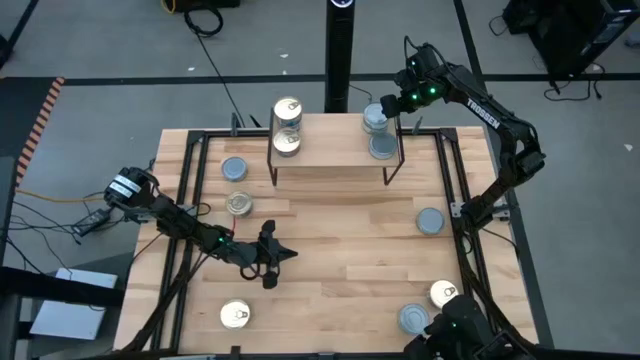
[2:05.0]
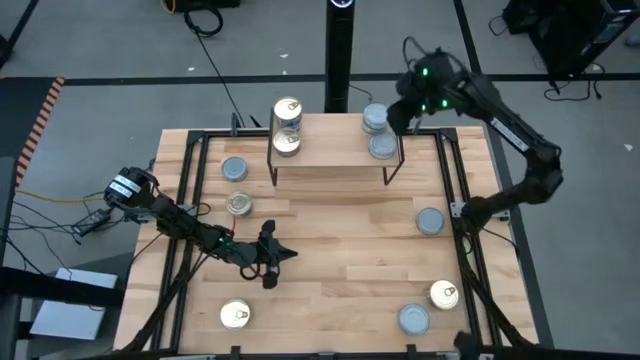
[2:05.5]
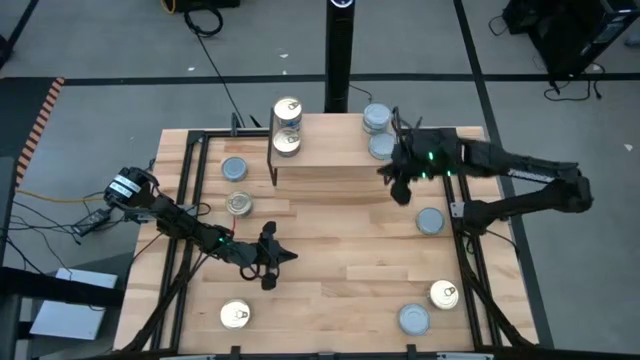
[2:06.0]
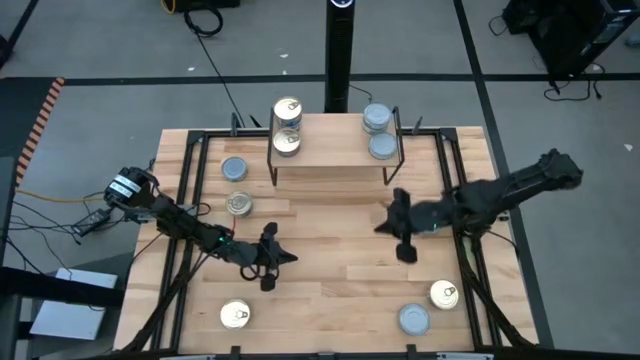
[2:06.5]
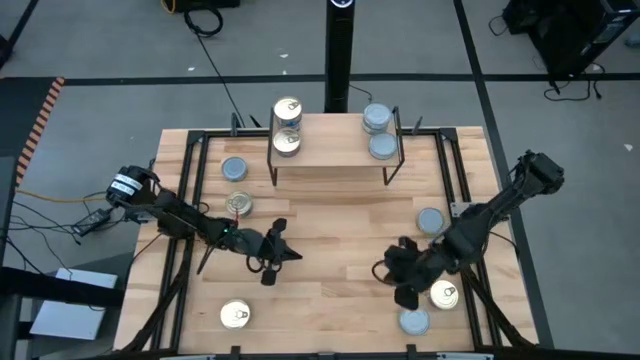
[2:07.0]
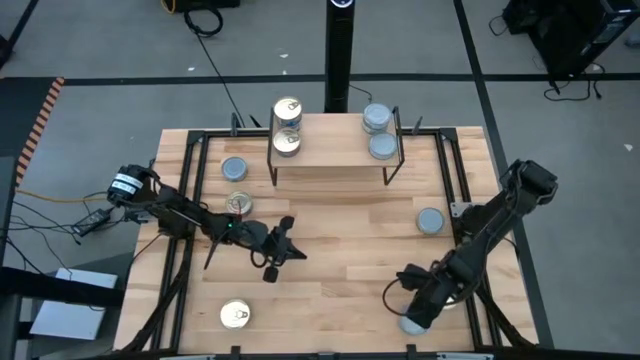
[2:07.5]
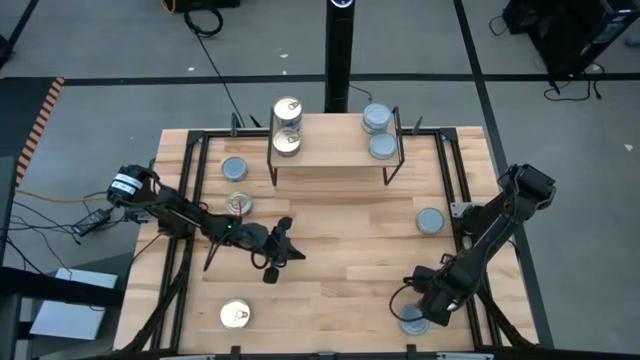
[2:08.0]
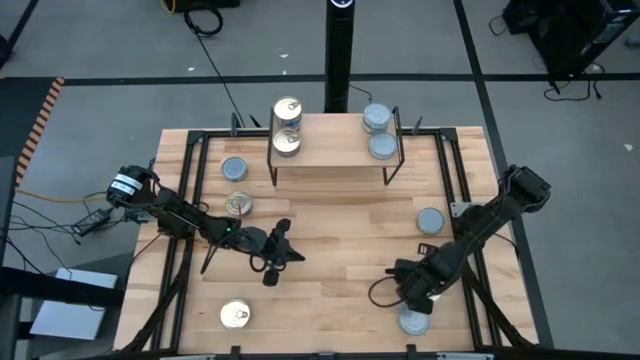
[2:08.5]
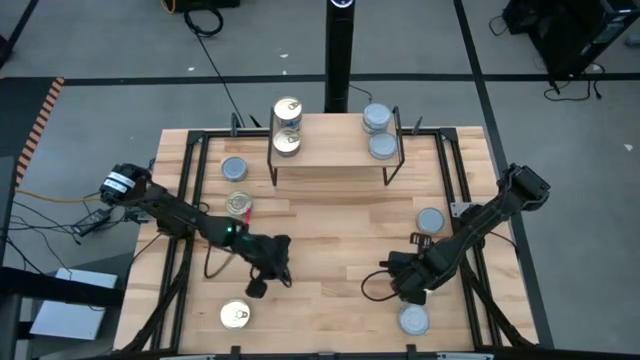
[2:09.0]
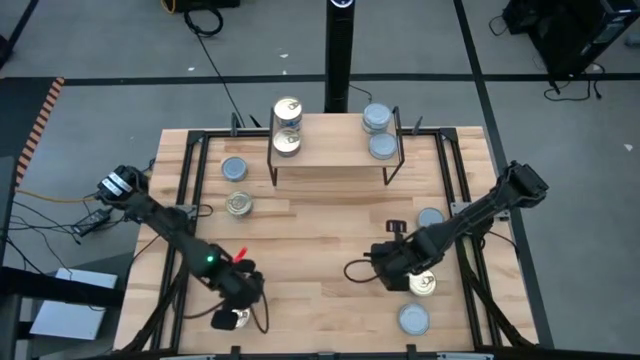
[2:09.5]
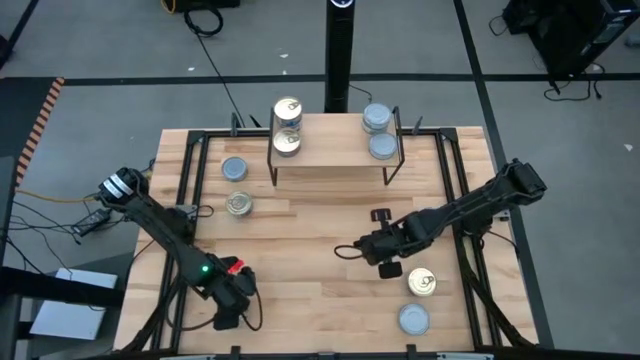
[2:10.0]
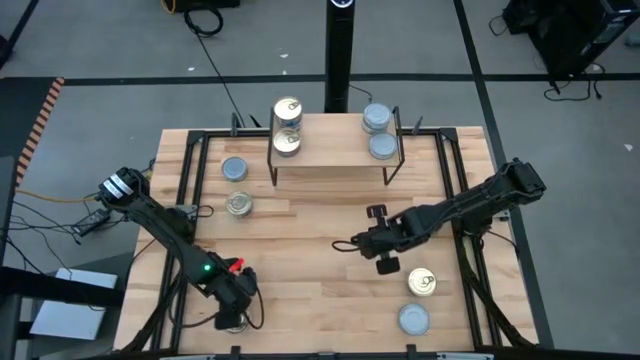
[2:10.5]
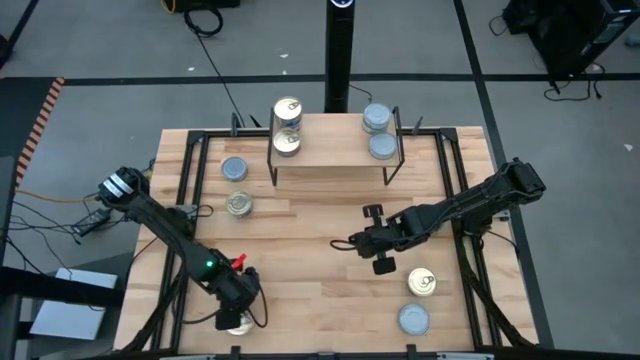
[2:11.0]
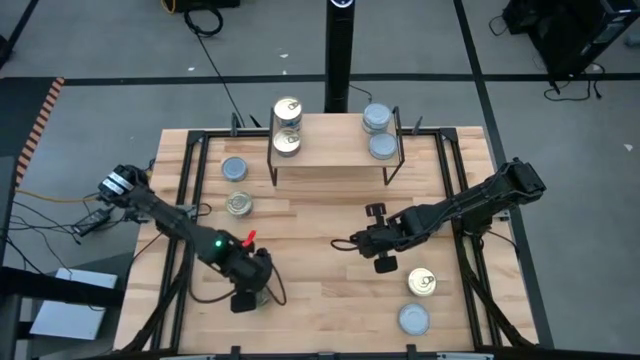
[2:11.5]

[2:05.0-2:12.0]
Task: Stack canned seafood by type on shelf
Stack the blue pink tuna can on the bottom blue pink tuna can on the shelf

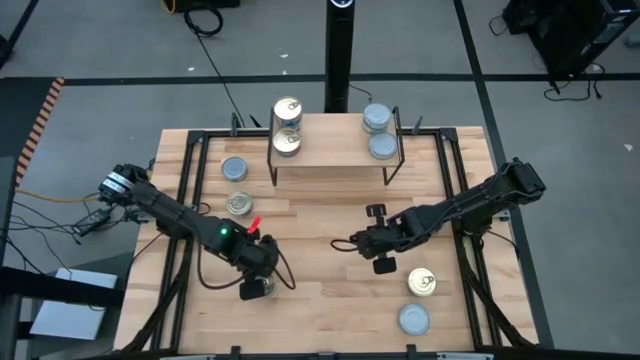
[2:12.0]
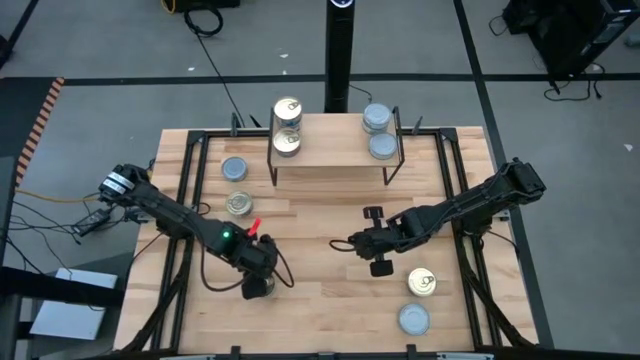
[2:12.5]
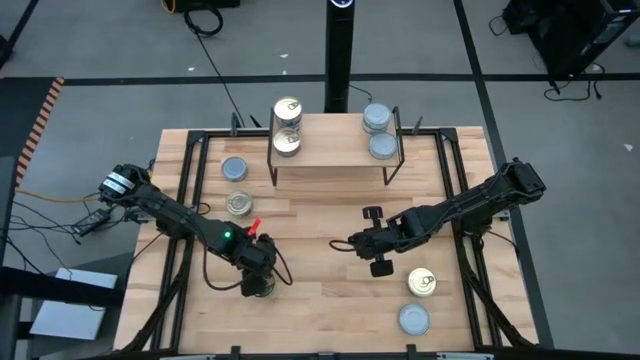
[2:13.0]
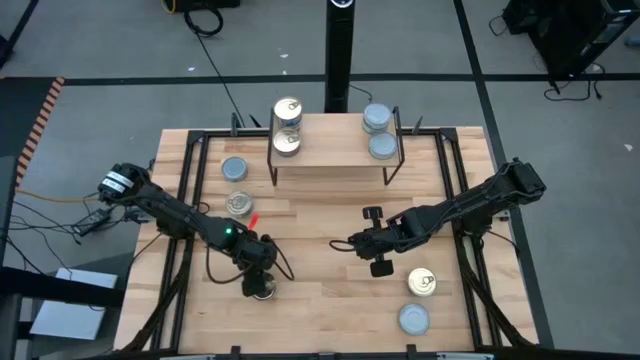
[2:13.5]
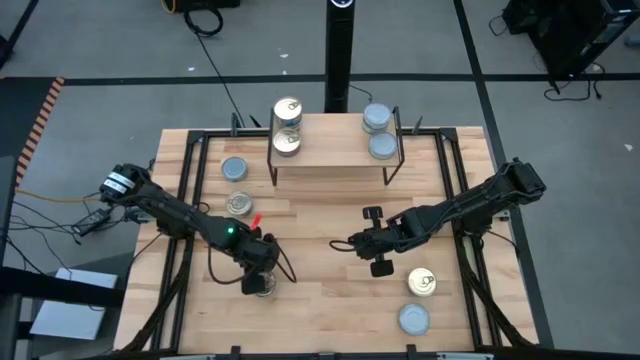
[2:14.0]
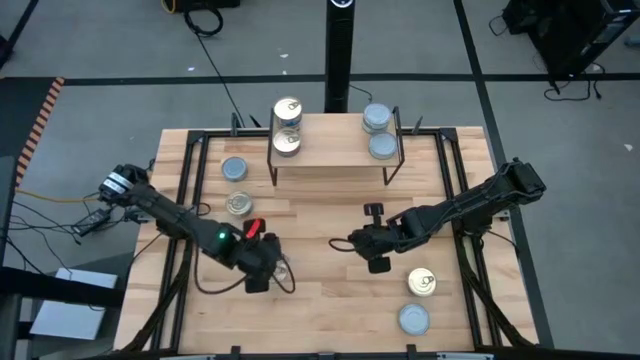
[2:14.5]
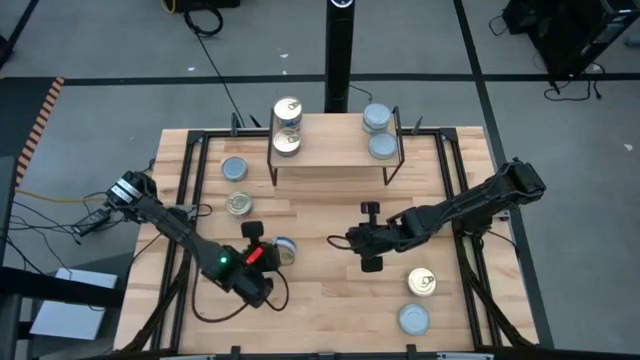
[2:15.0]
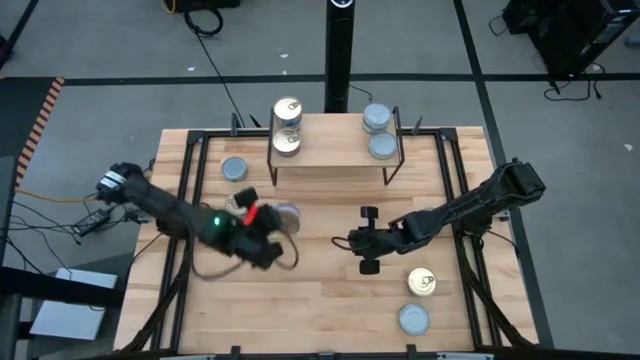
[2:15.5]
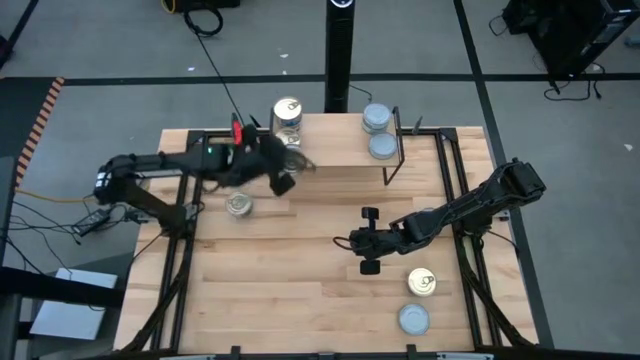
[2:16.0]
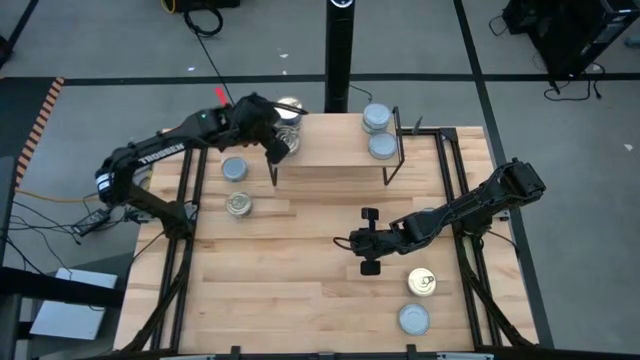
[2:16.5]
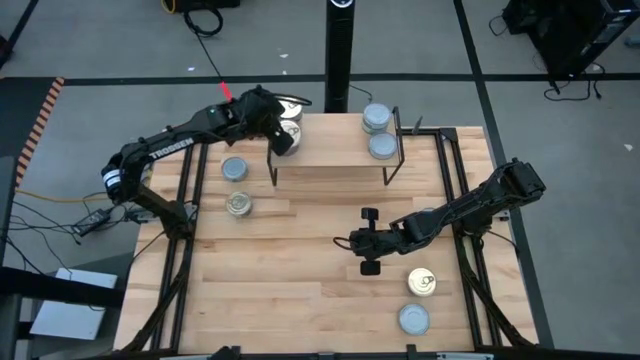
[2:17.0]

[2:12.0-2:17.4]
Stack the blue pink tuna can on the bottom blue pink tuna can on the shelf

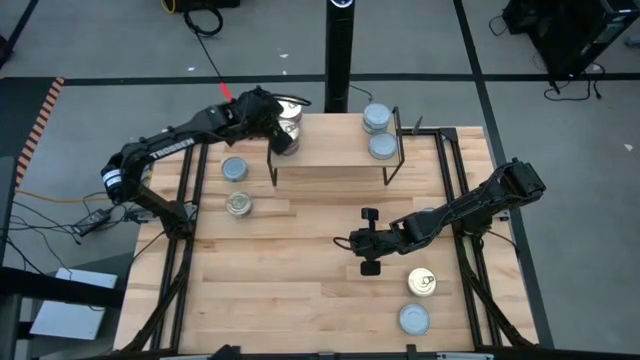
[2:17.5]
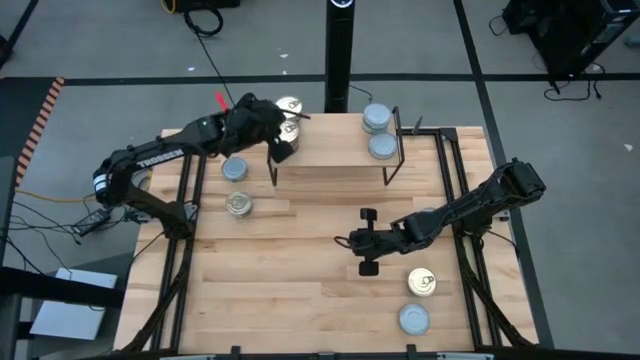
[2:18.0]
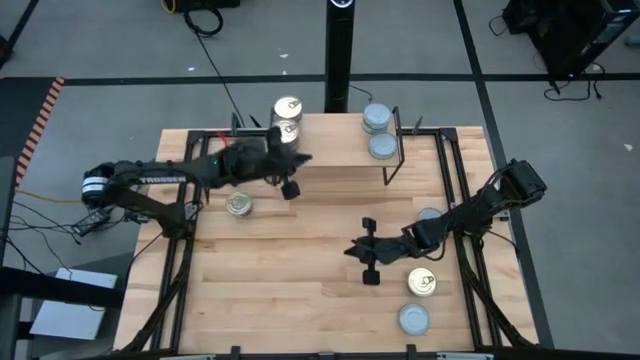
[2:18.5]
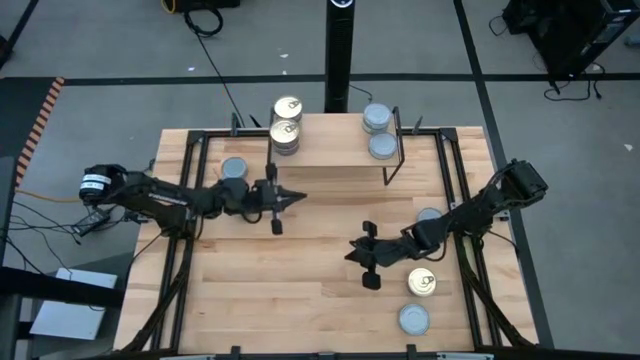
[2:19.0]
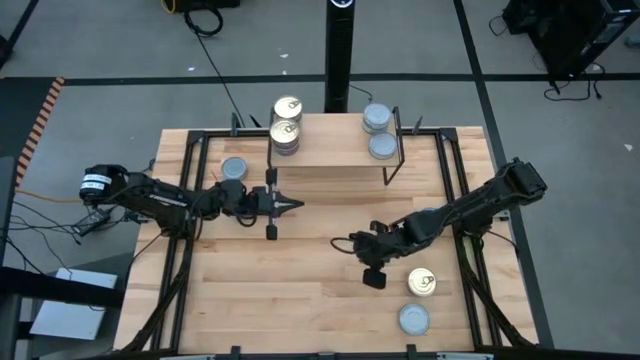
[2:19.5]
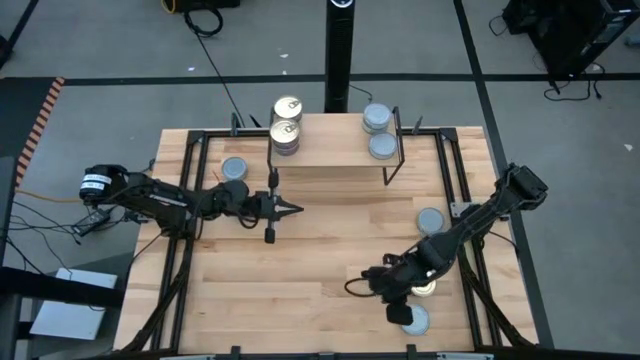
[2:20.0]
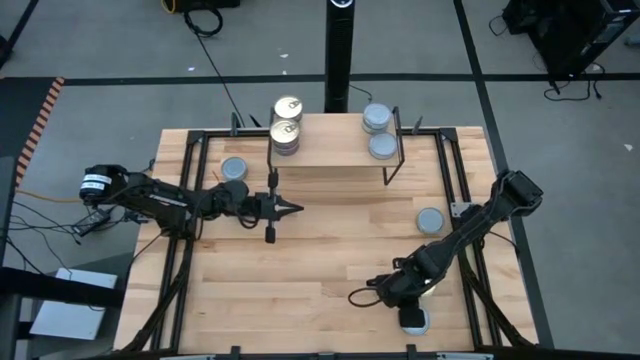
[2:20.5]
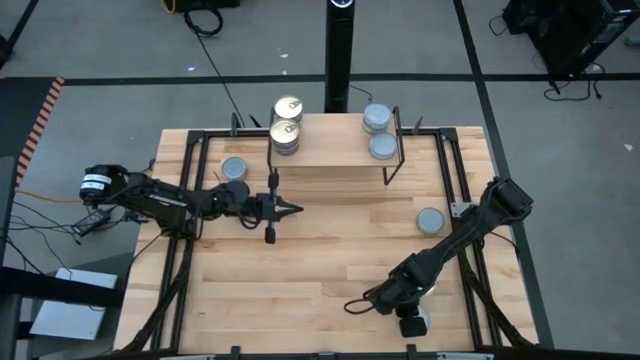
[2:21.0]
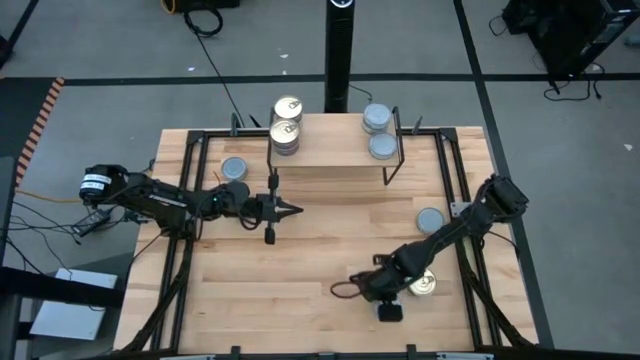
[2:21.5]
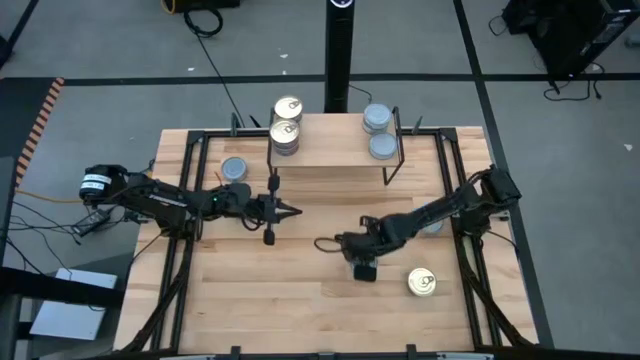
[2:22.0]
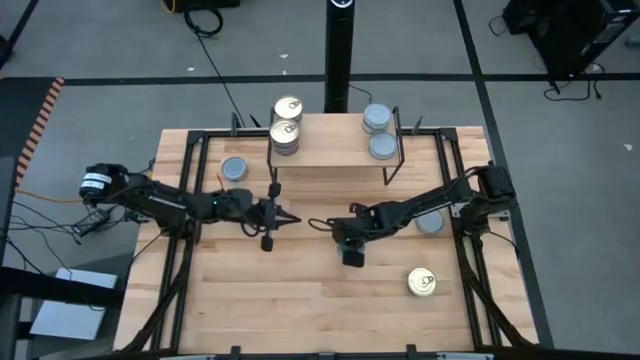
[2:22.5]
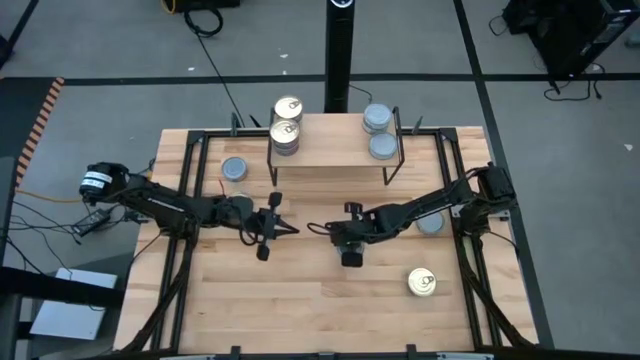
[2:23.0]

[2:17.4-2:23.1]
Adjust the green tuna can on the table

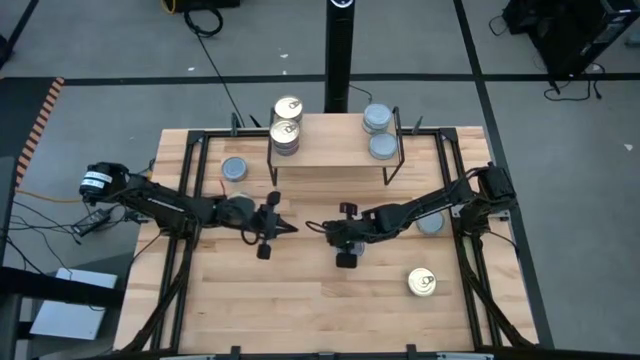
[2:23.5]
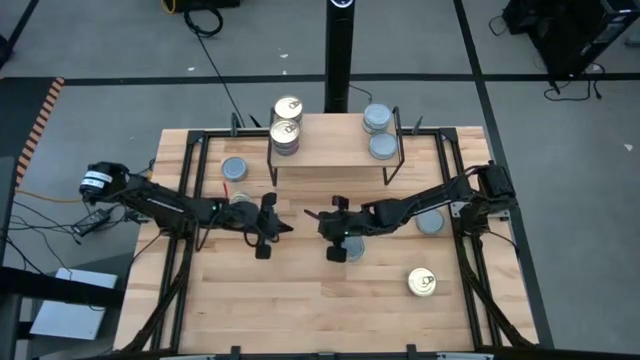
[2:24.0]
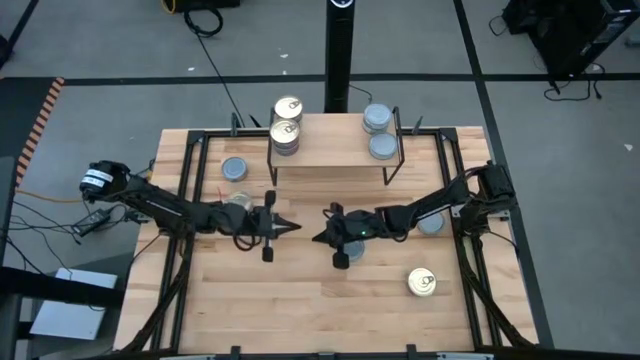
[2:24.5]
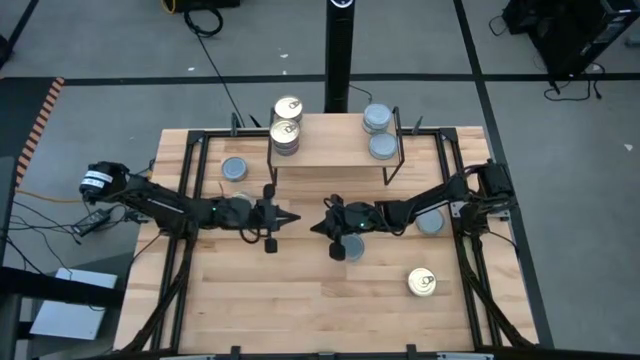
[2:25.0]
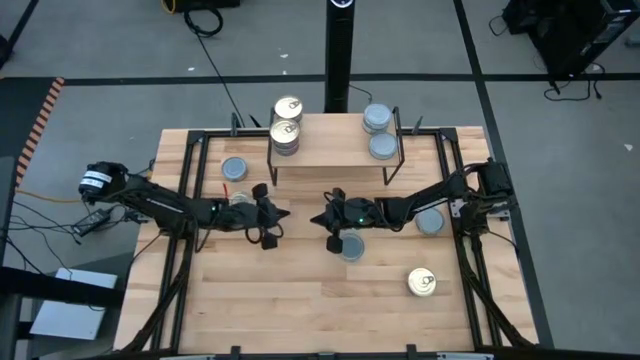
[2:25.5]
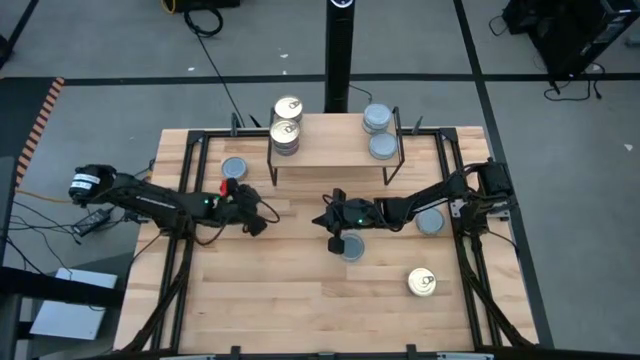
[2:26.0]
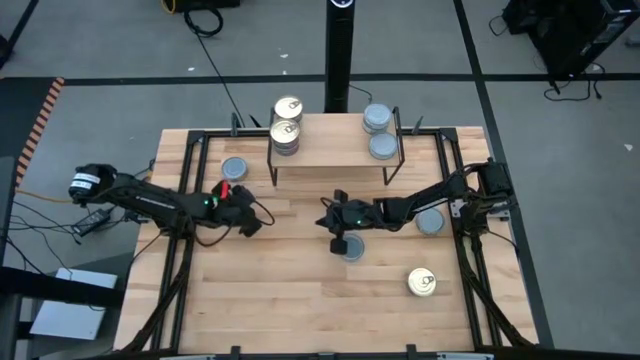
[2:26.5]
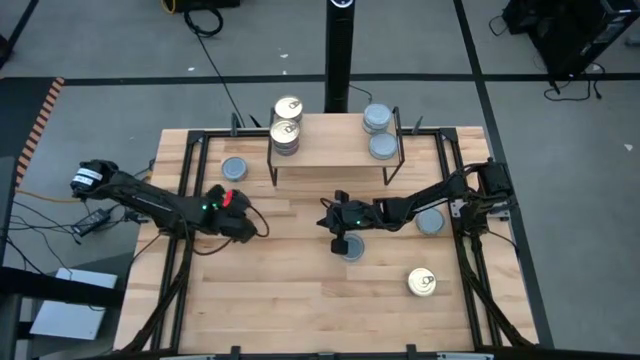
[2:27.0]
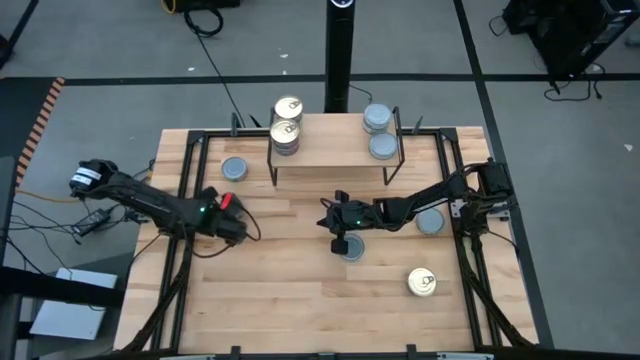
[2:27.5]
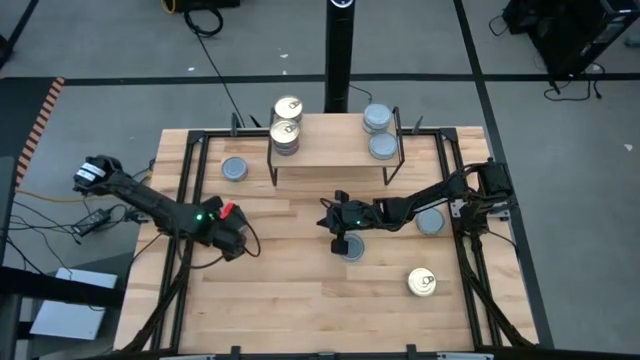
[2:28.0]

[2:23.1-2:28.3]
Adjust the blue pink tuna can on the table
